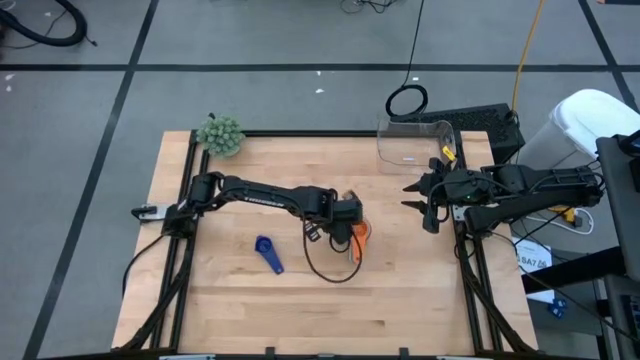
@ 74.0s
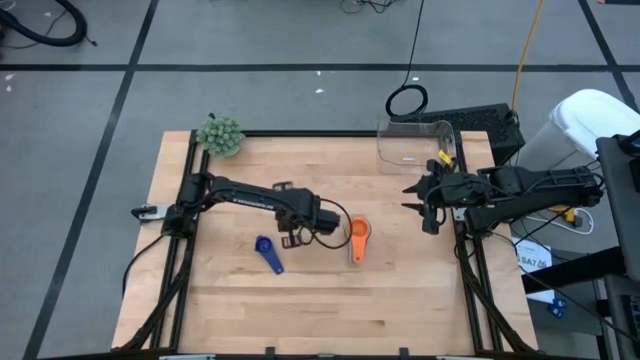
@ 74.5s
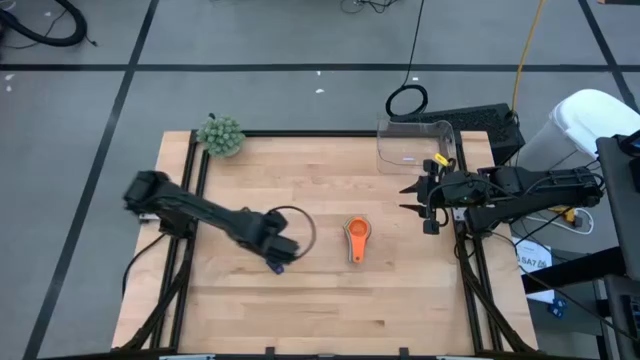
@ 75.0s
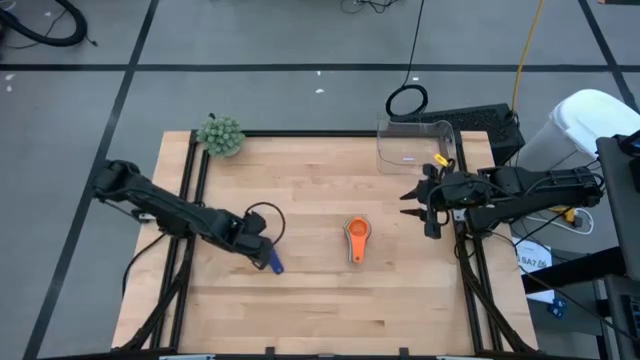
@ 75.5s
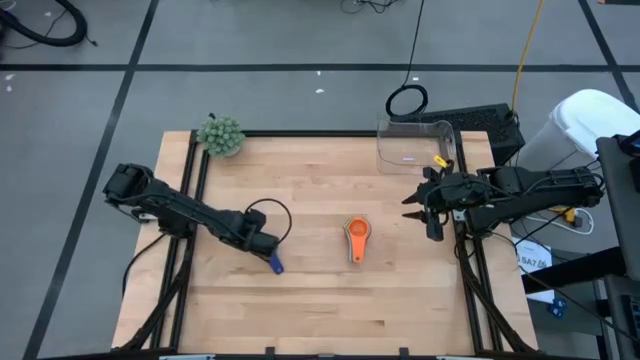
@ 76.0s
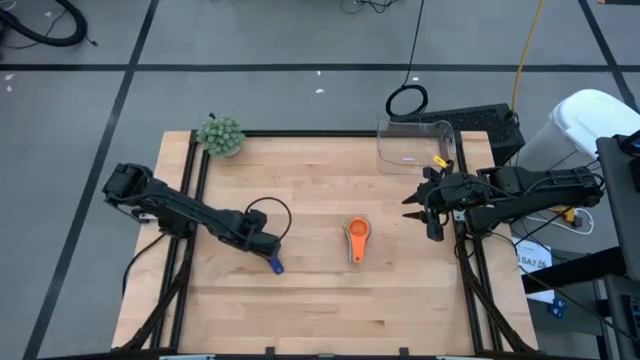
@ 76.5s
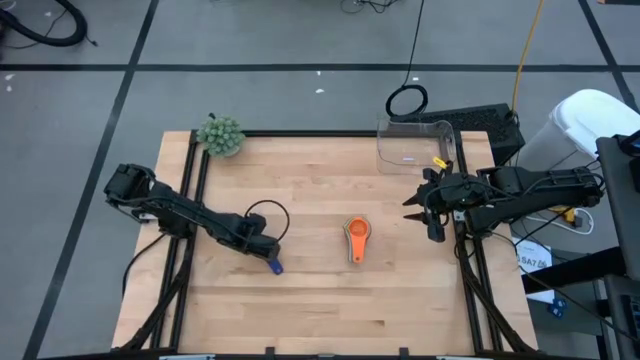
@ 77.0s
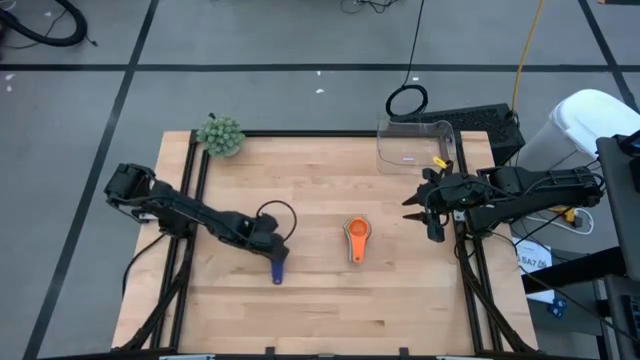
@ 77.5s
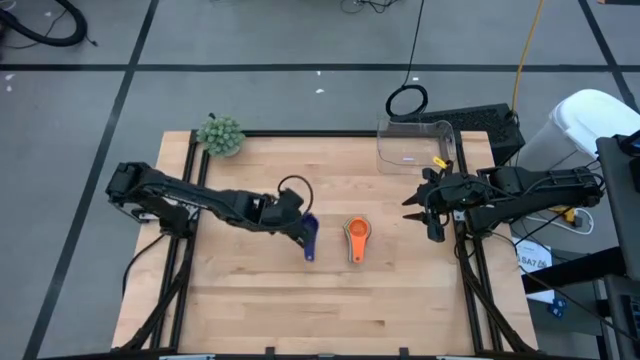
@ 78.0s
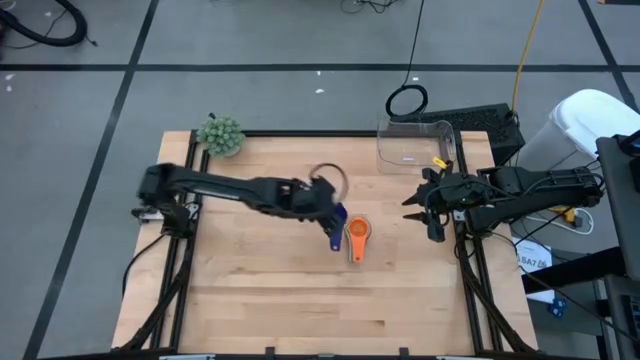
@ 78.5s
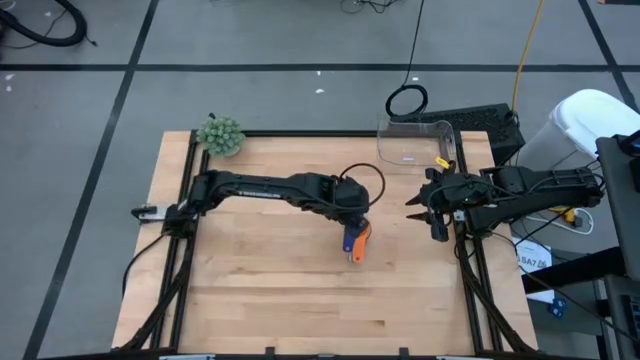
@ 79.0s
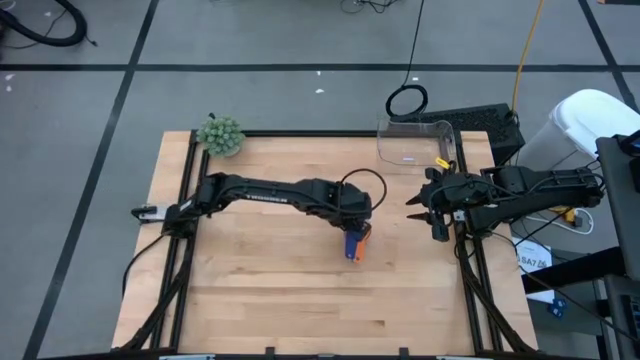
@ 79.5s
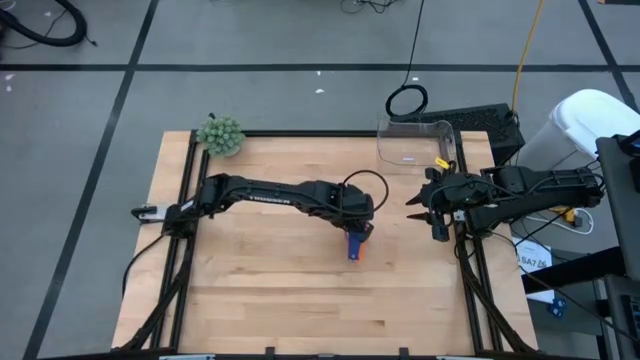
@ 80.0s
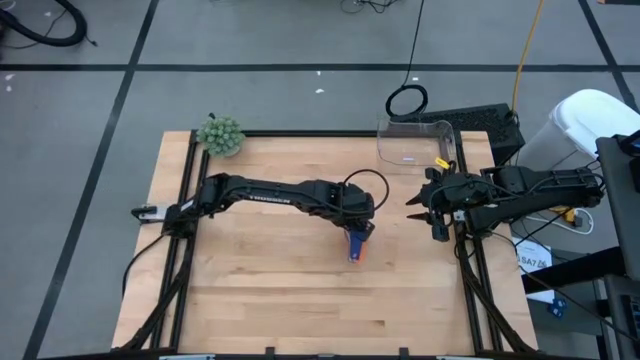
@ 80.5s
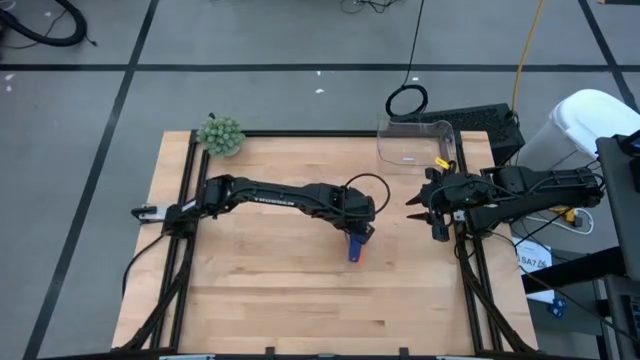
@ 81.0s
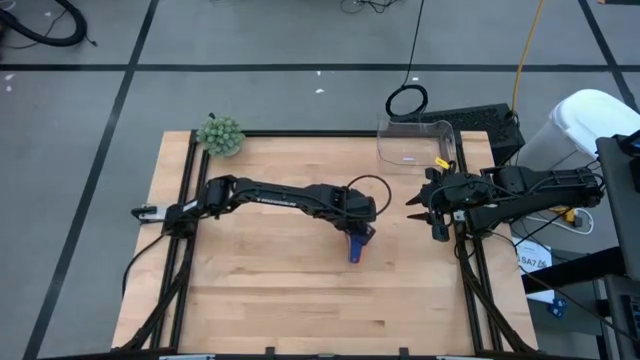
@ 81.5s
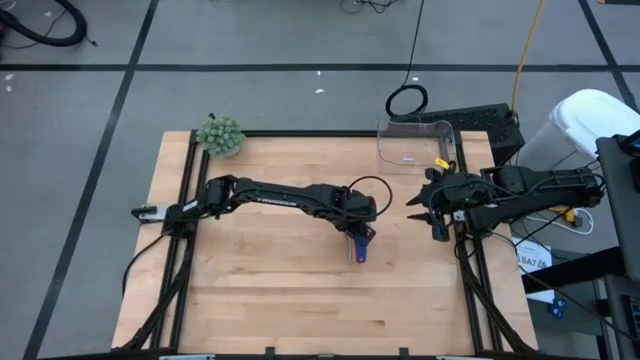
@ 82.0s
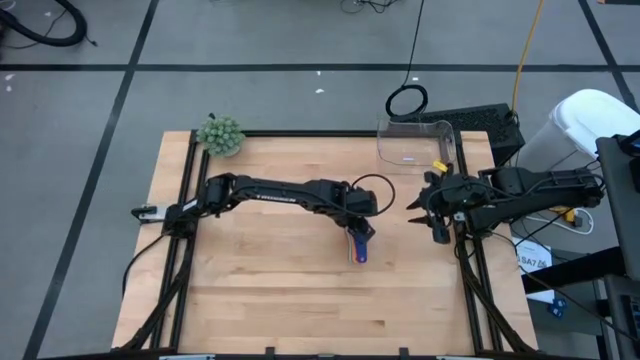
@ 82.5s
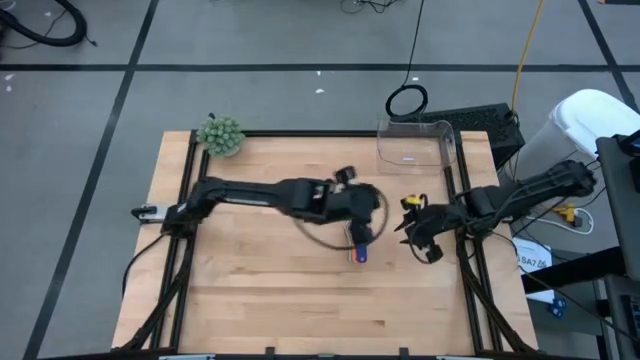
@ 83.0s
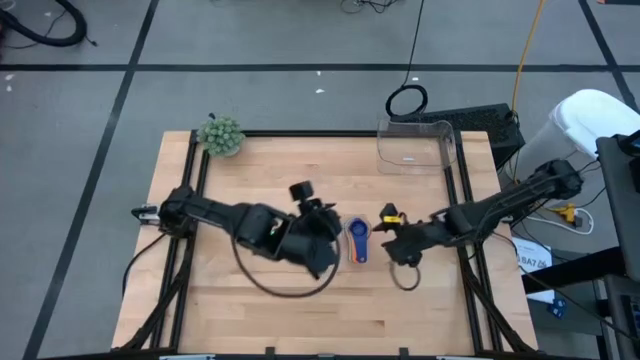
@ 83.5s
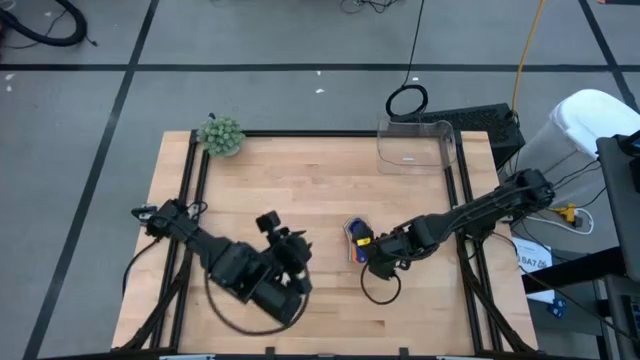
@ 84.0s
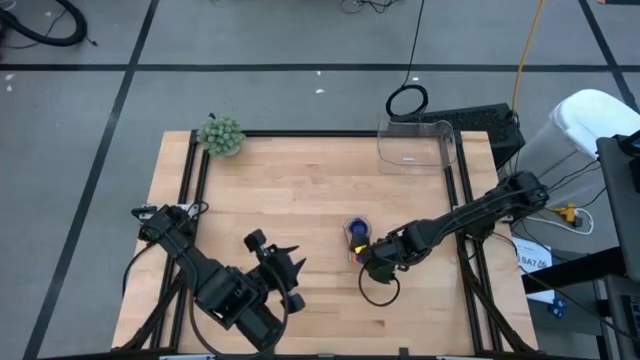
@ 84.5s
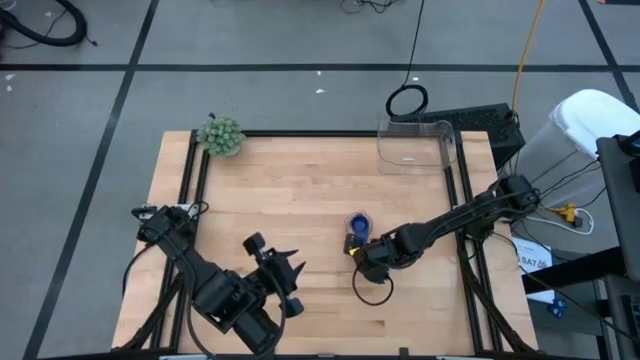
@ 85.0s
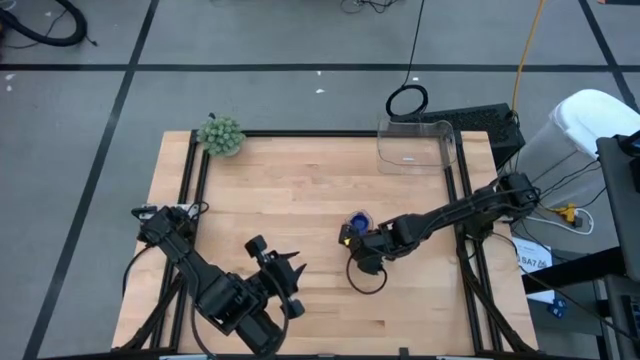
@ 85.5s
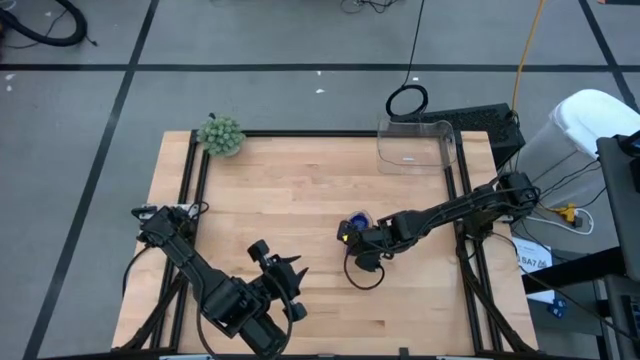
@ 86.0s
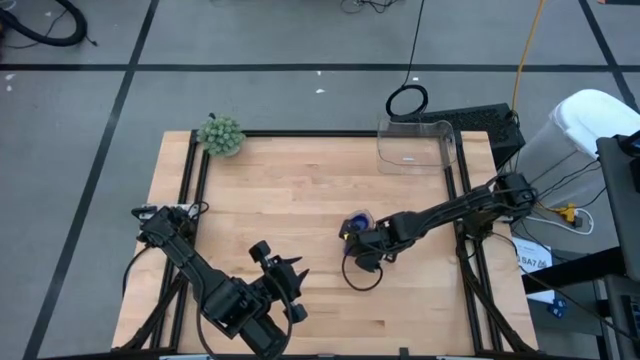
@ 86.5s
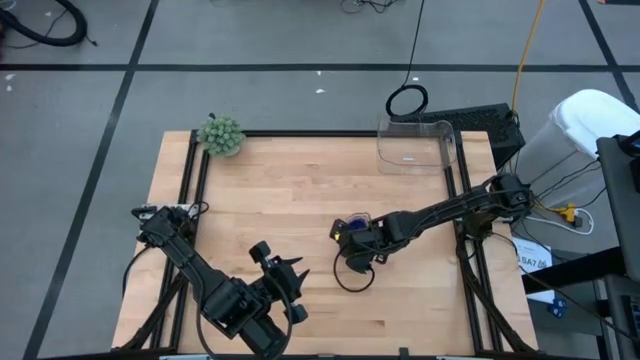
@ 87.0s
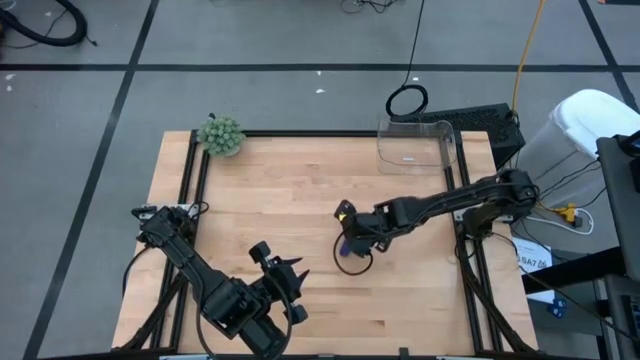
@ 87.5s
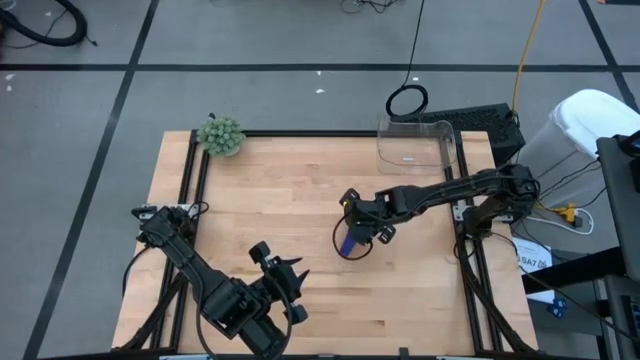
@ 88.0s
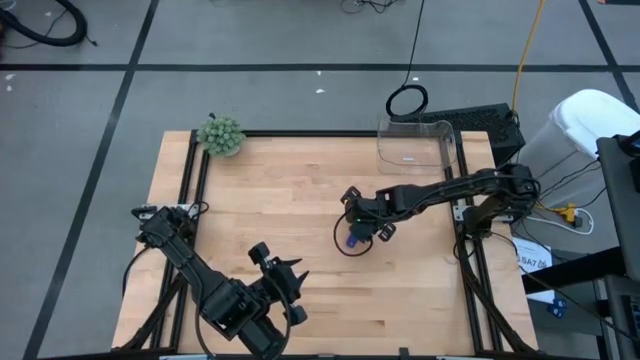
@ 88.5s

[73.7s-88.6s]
Task: Nest measuring cups in basket
Stack the dark blue measuring cup on top of the orange measuring cup

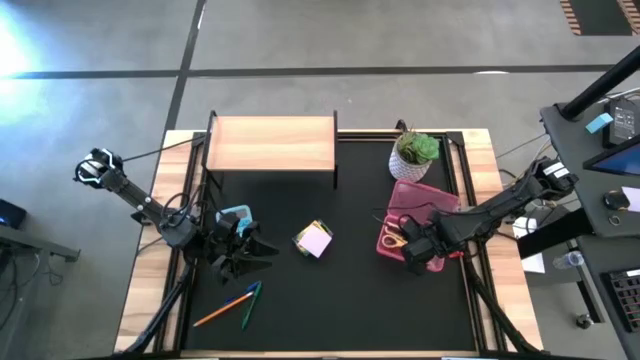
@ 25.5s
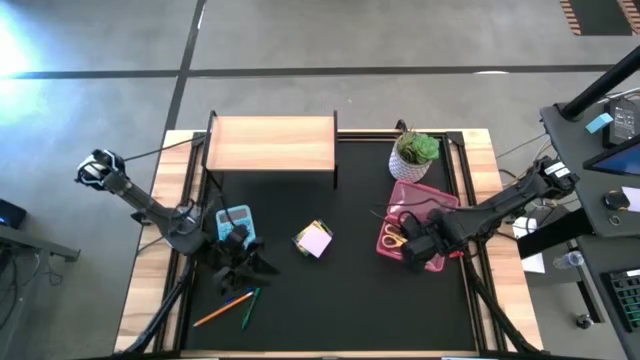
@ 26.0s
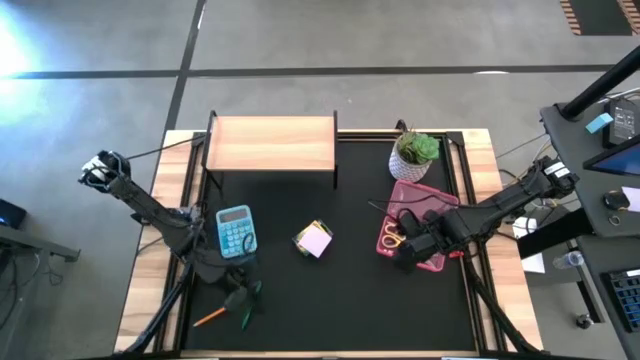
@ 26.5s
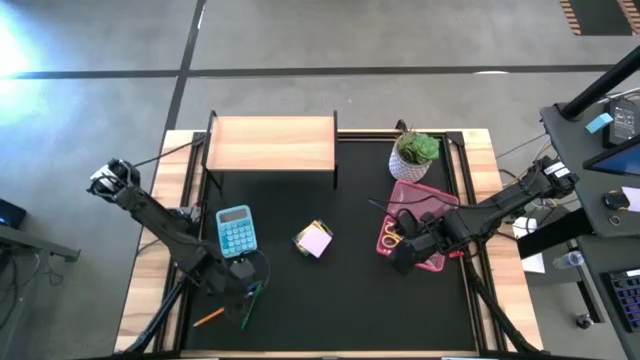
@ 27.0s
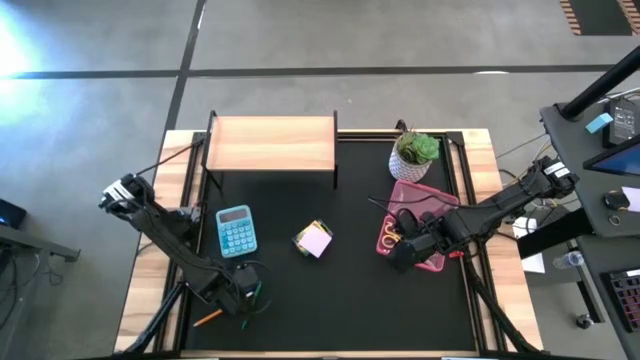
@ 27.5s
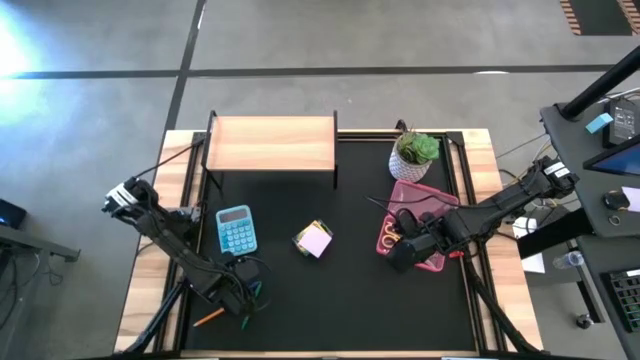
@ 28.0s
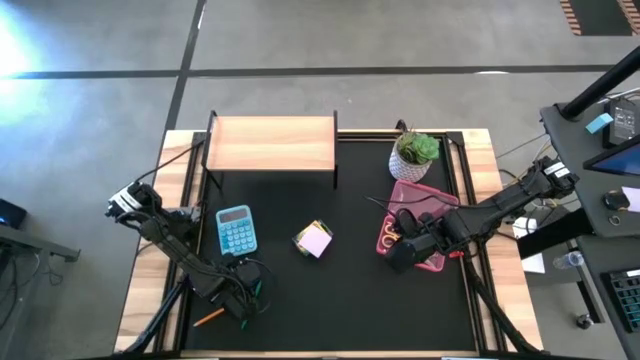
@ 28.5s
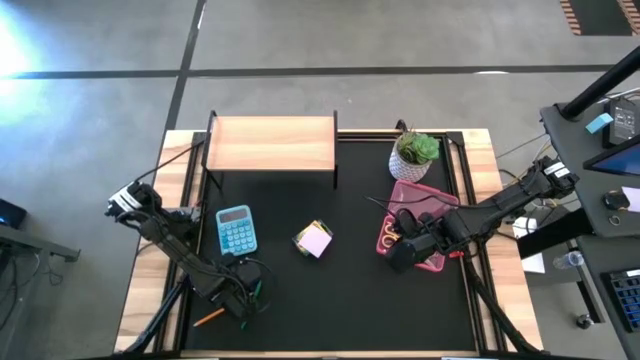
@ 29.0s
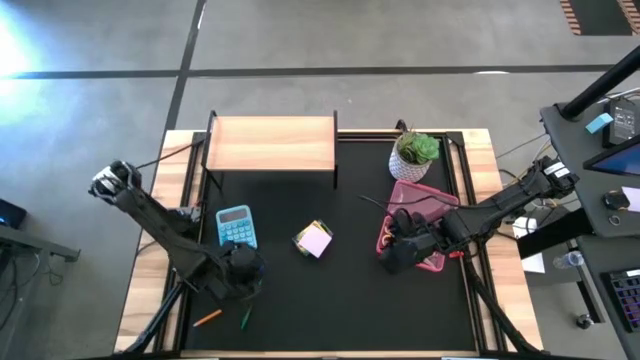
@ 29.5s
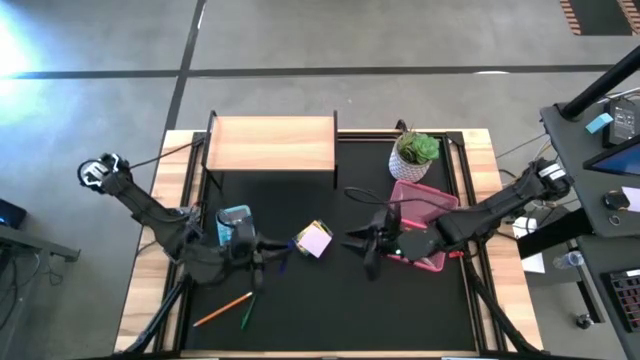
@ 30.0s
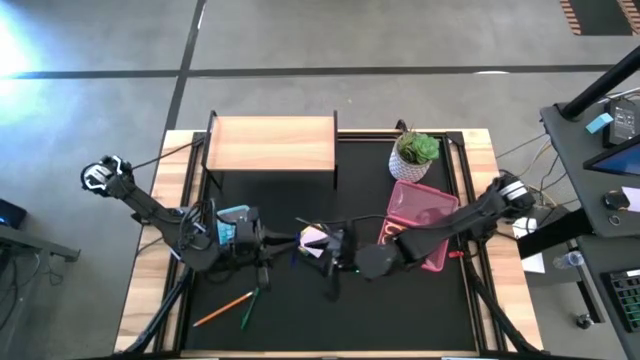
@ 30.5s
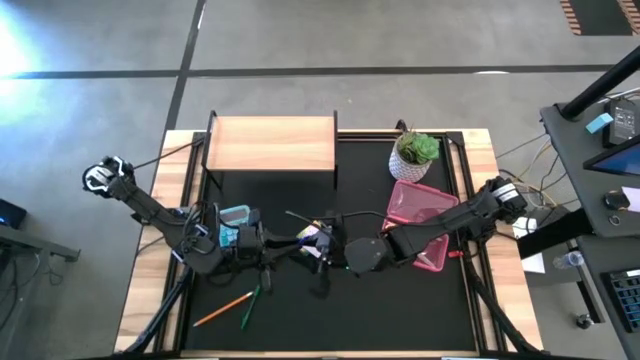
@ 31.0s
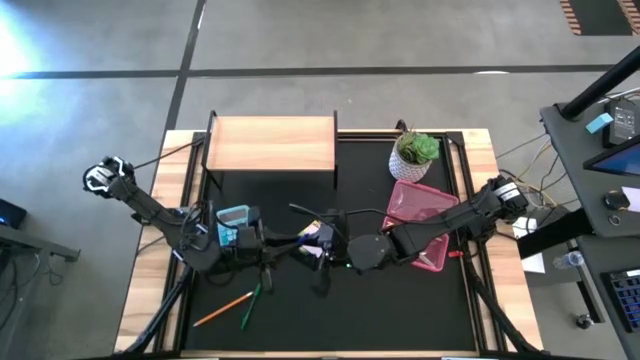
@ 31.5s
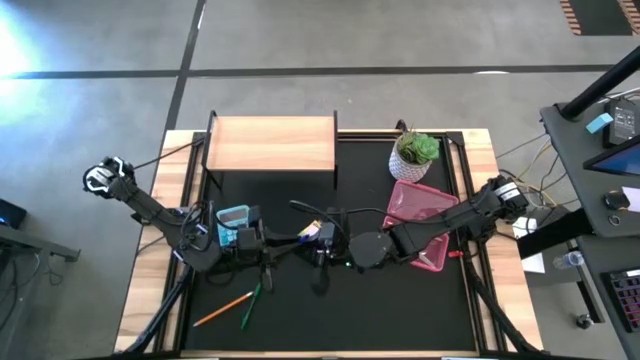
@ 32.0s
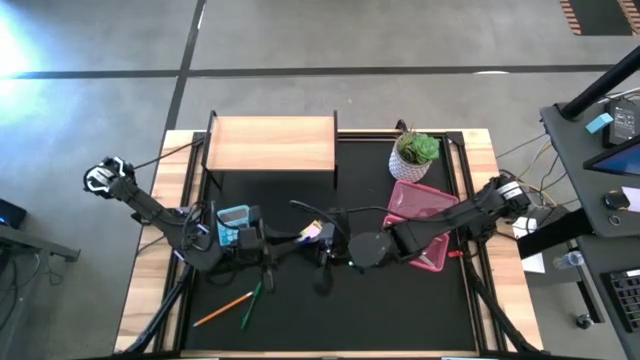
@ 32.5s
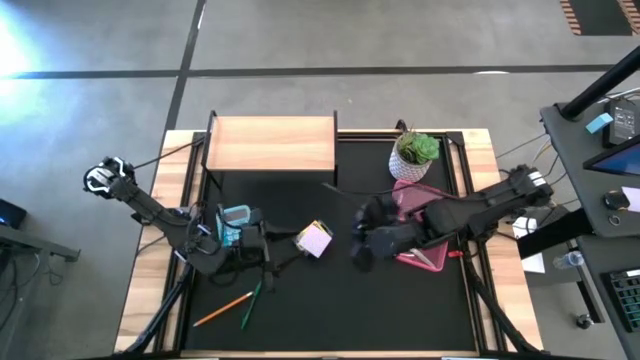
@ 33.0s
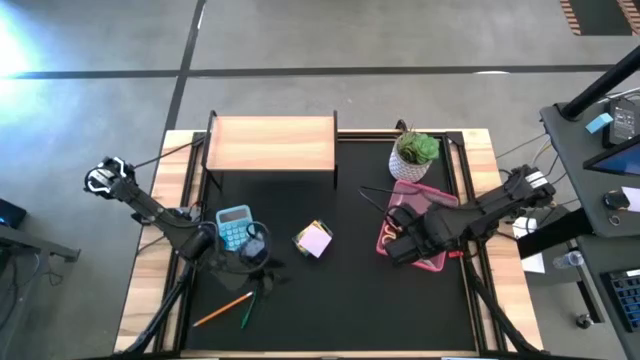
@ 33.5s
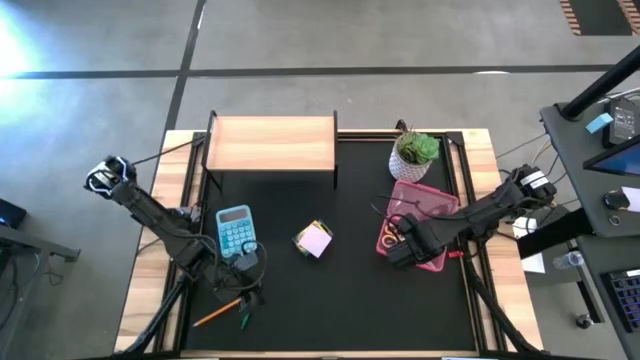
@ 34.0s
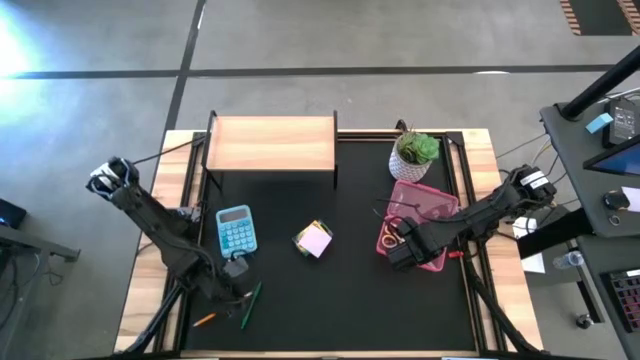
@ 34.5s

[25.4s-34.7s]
Task: Pack school essentials
Put the blue pen into the pink supply box
